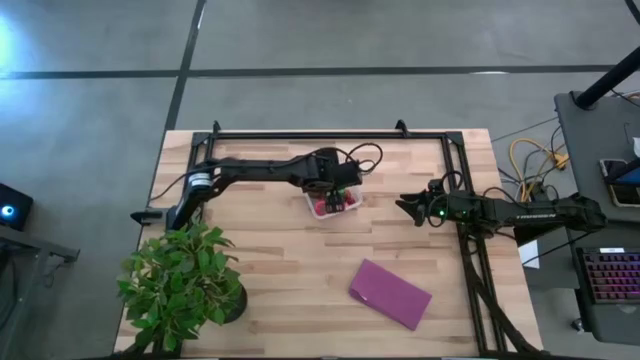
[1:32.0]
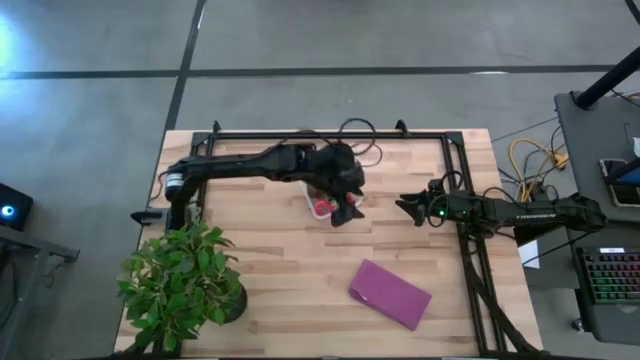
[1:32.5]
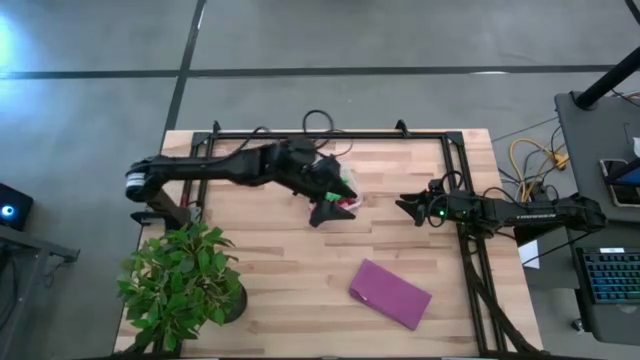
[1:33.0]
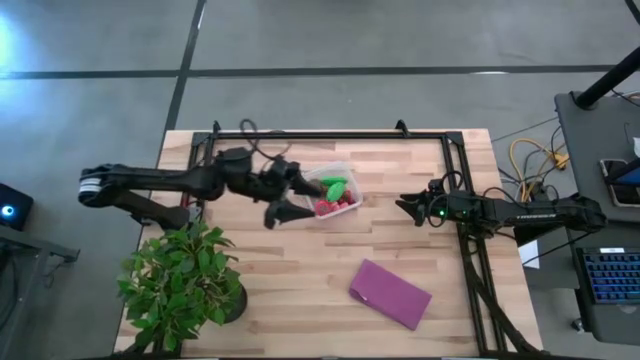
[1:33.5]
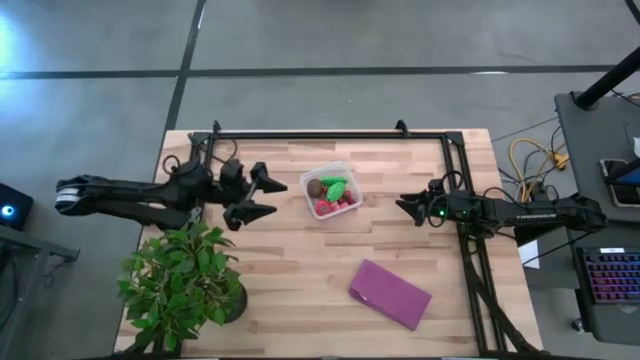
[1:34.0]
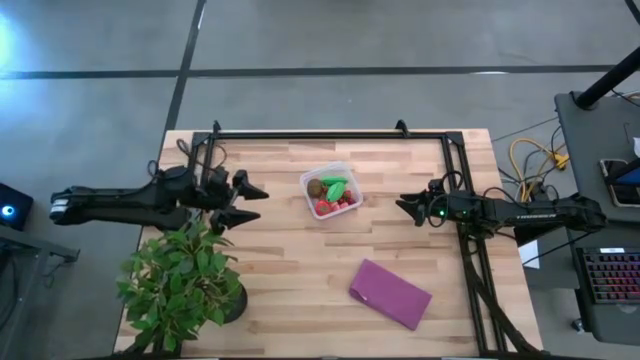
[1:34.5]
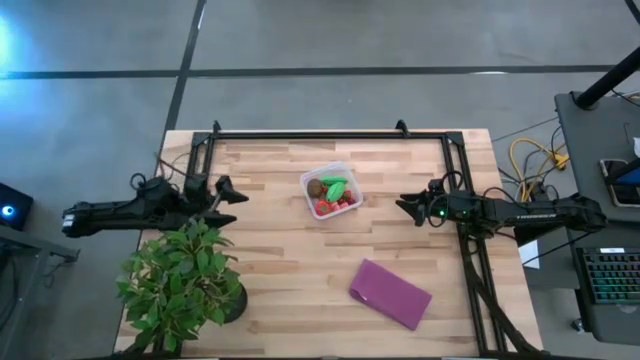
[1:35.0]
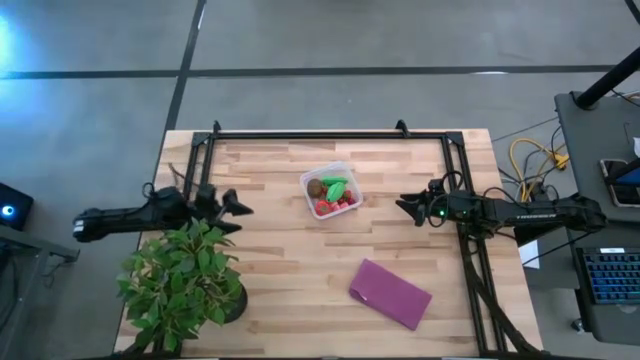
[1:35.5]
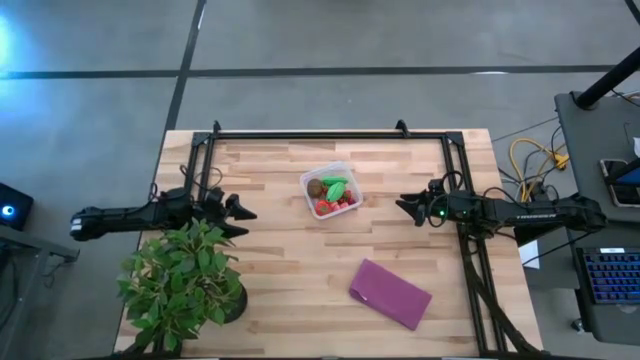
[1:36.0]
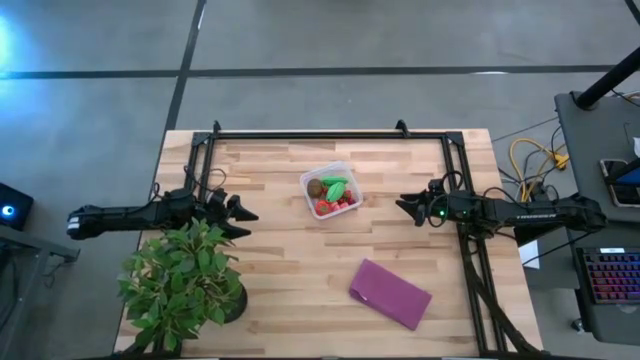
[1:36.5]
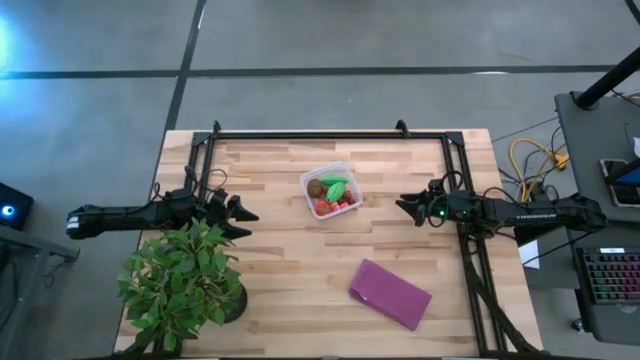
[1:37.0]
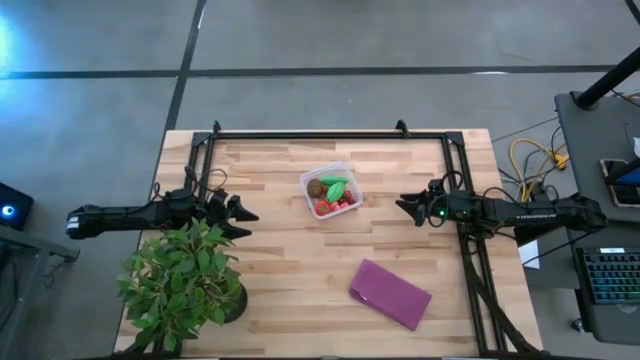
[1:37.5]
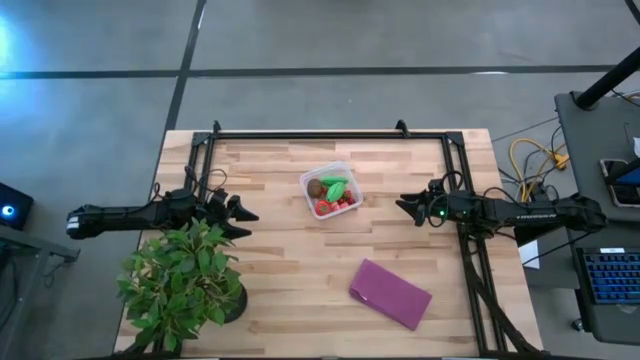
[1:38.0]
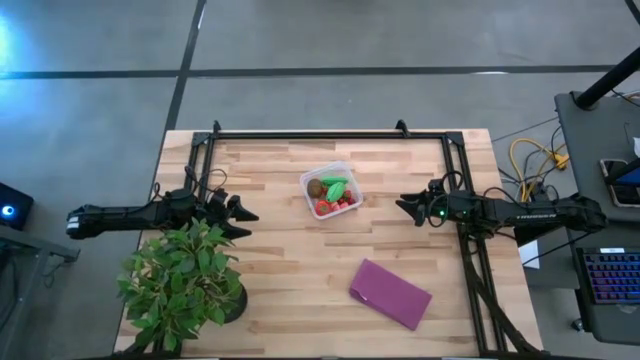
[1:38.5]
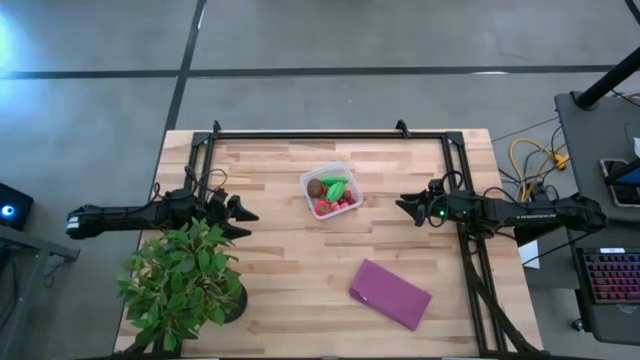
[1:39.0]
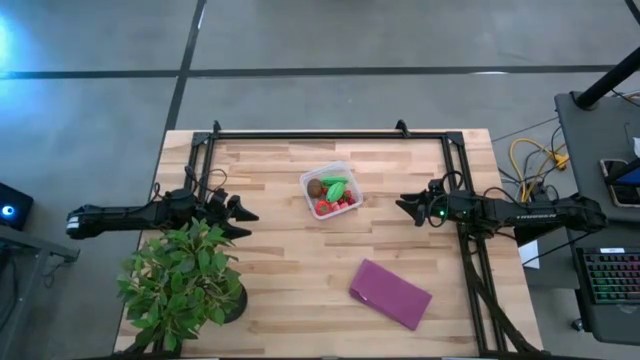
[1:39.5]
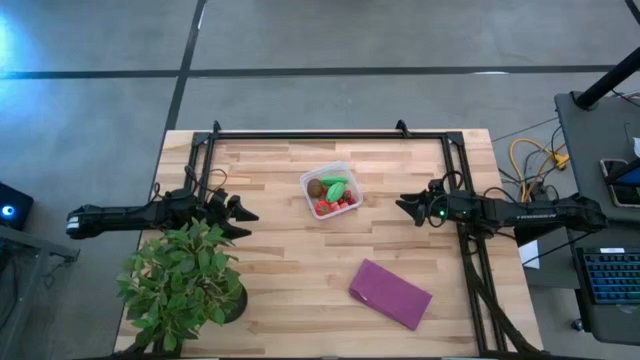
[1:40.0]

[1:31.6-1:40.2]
Task: Pick and placing Produce into tupperware
Return to Home Position

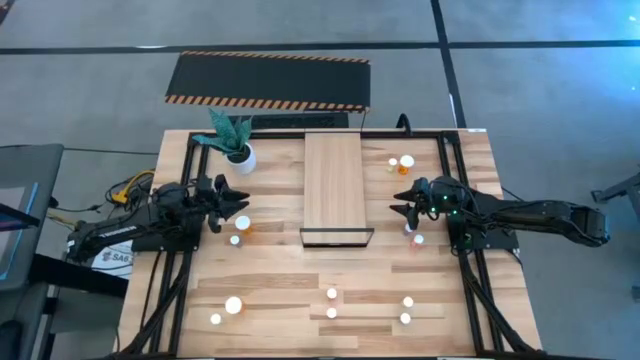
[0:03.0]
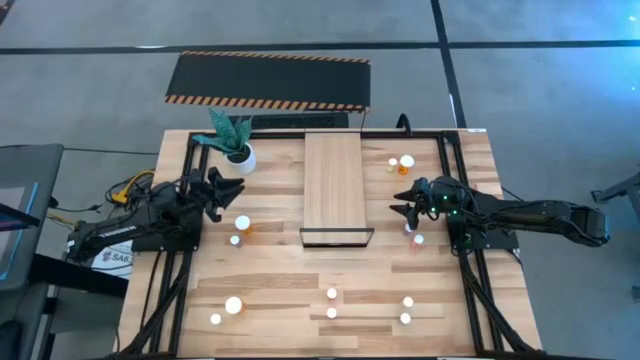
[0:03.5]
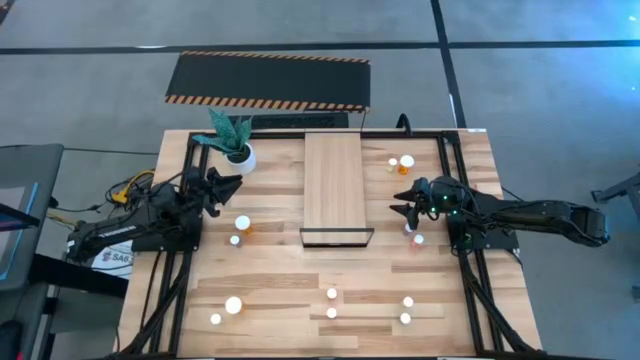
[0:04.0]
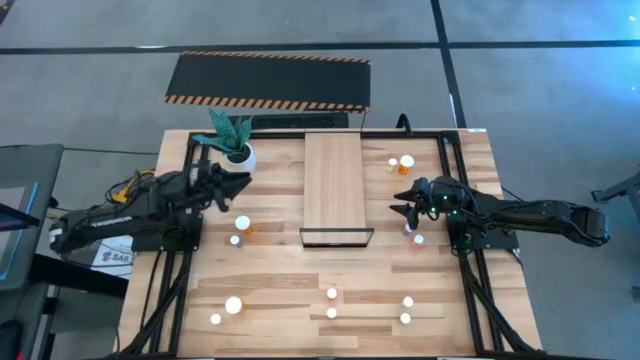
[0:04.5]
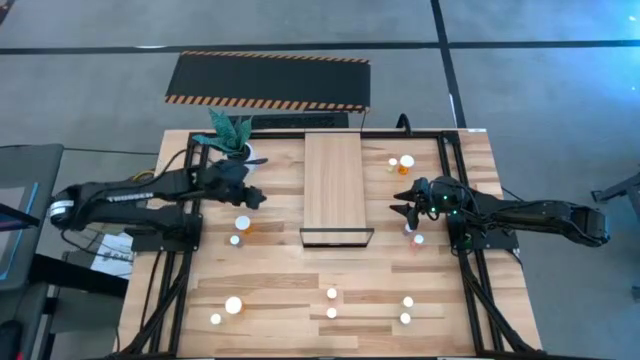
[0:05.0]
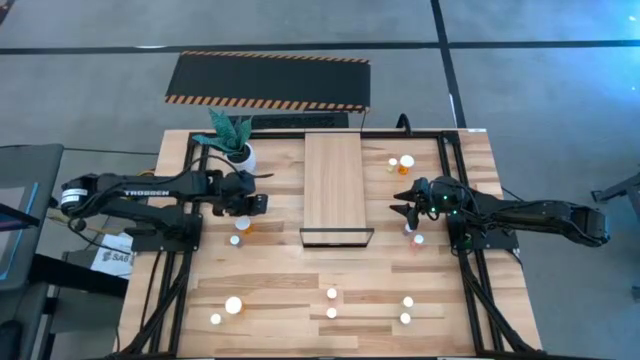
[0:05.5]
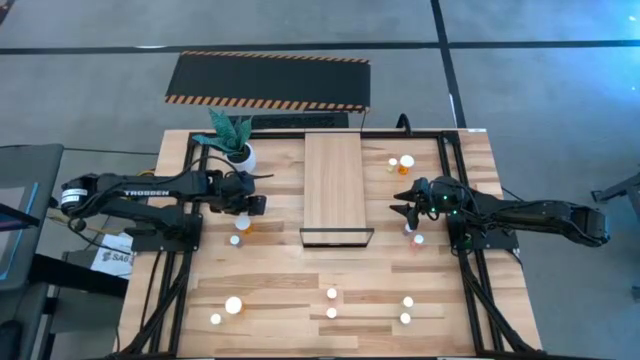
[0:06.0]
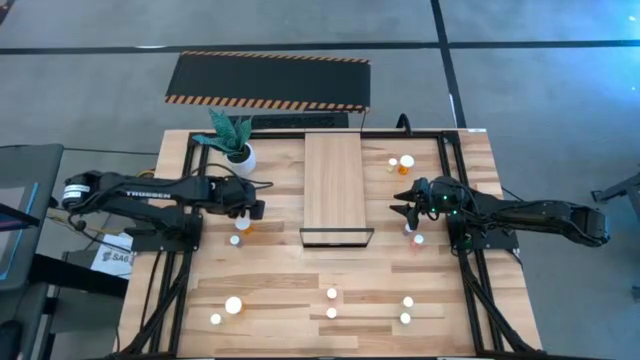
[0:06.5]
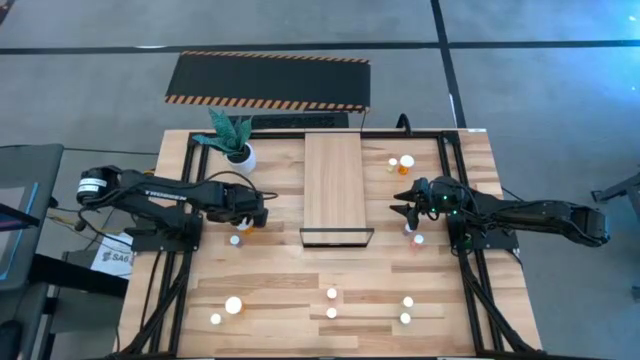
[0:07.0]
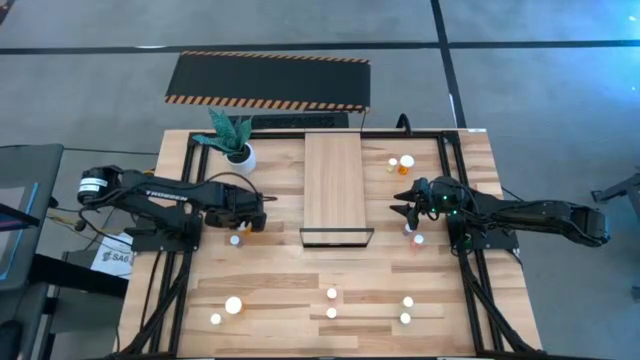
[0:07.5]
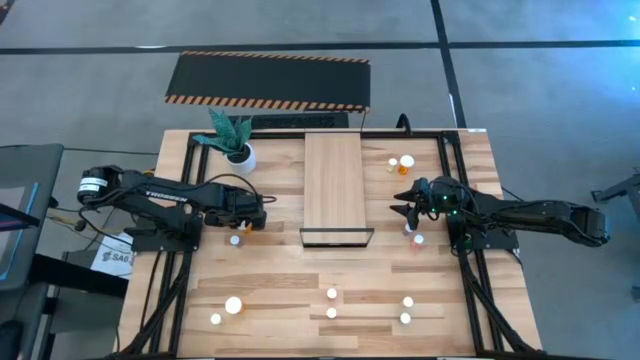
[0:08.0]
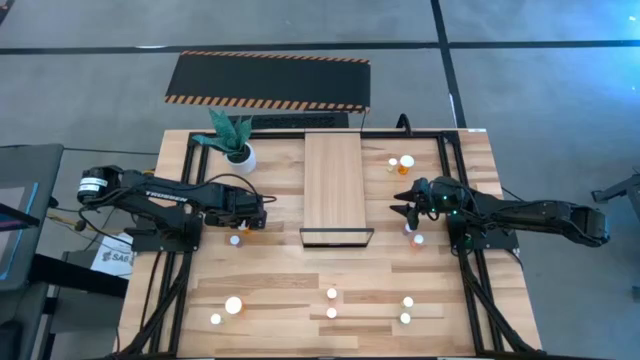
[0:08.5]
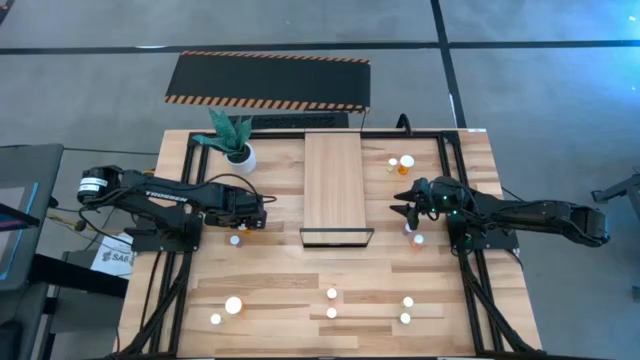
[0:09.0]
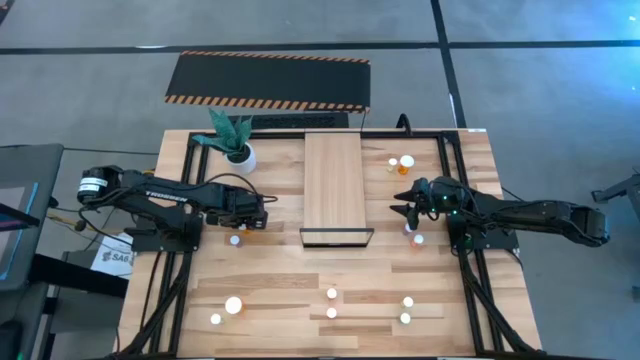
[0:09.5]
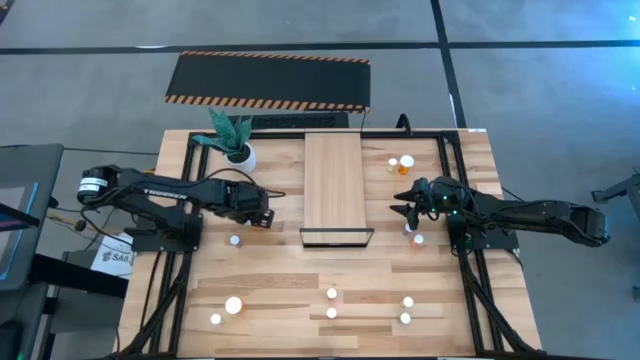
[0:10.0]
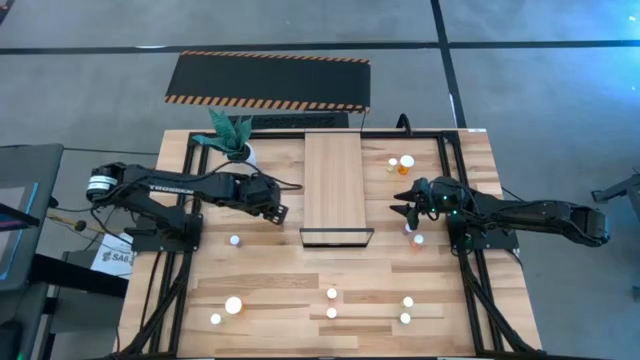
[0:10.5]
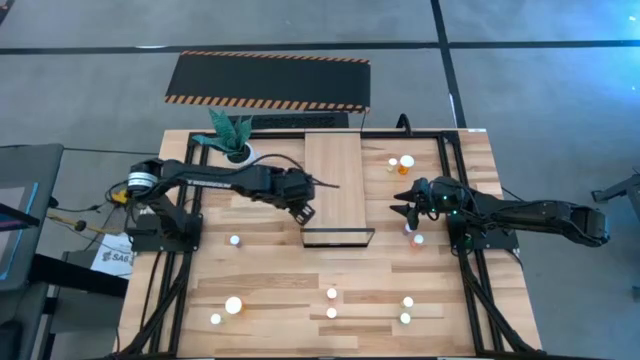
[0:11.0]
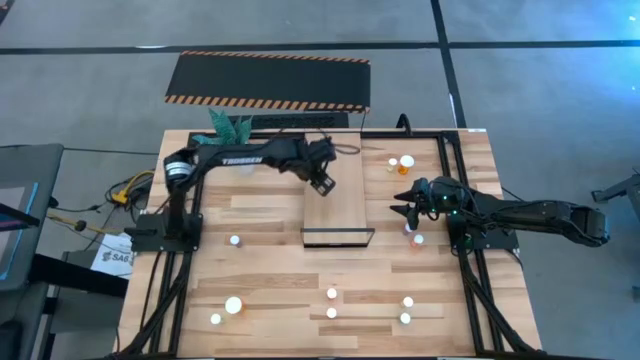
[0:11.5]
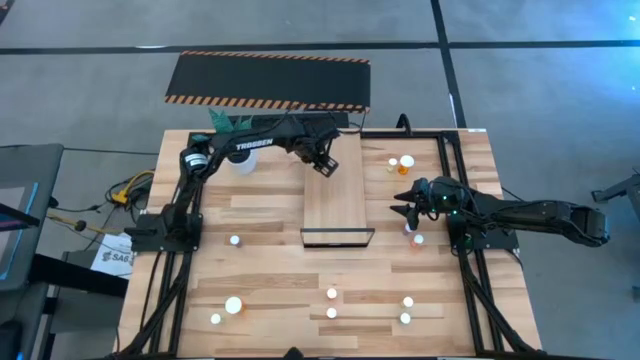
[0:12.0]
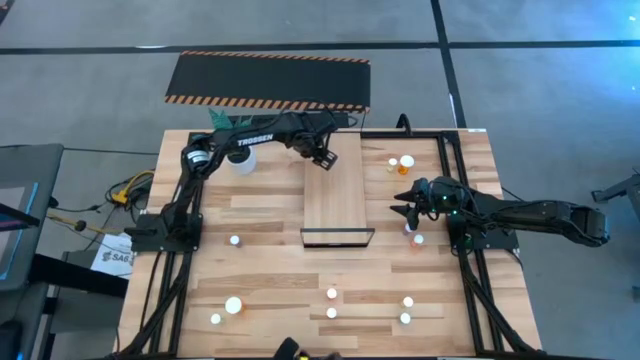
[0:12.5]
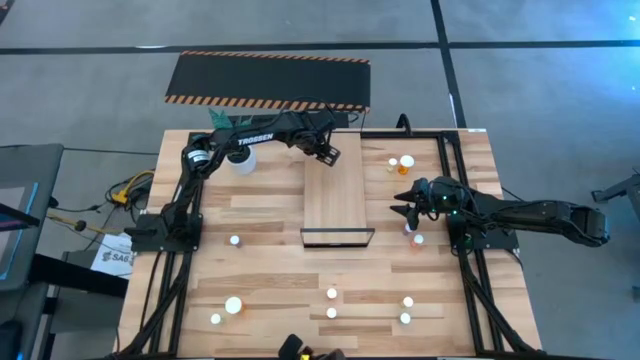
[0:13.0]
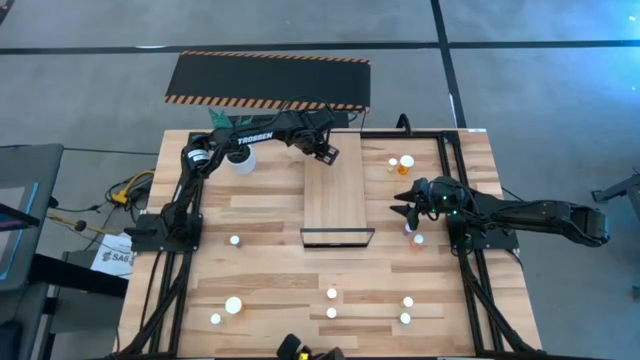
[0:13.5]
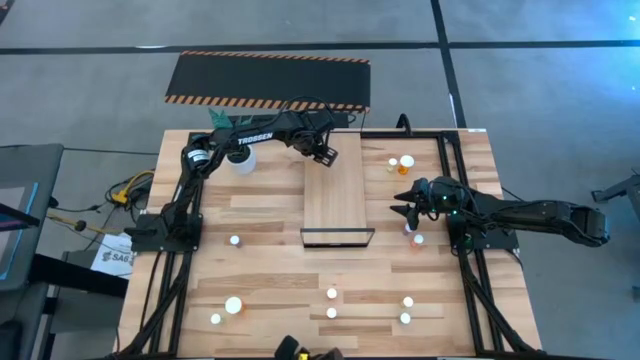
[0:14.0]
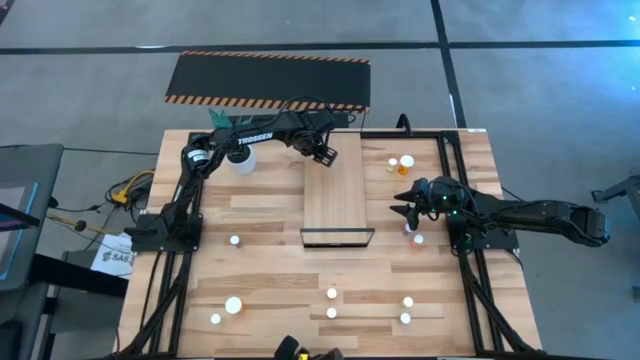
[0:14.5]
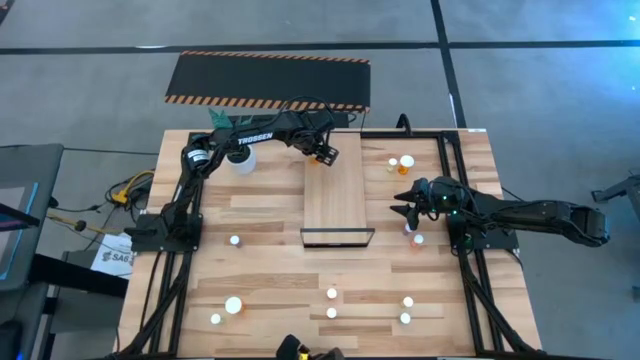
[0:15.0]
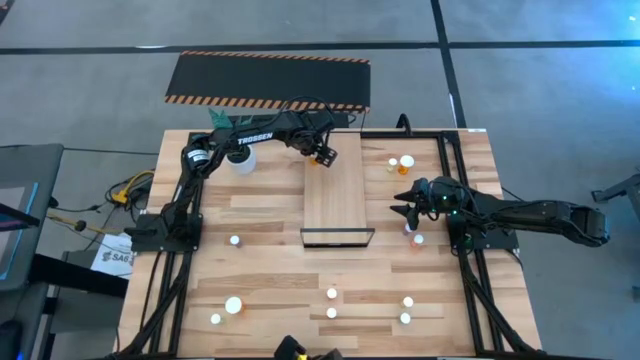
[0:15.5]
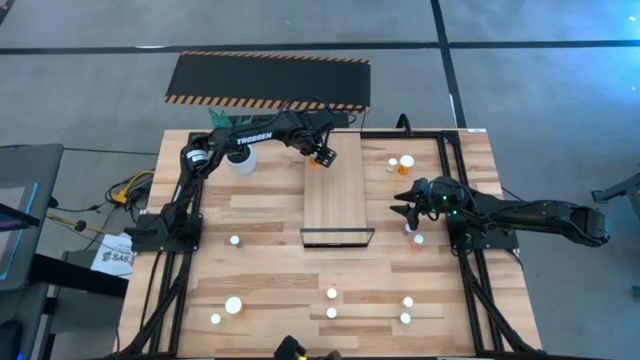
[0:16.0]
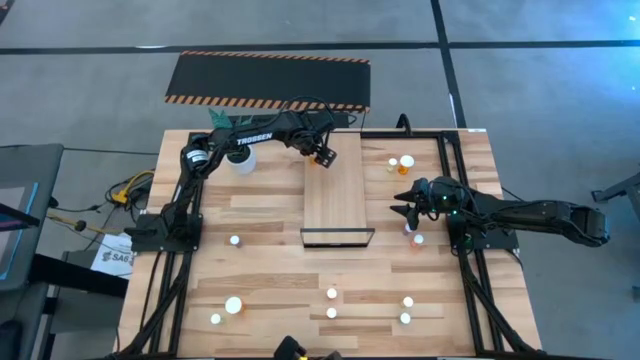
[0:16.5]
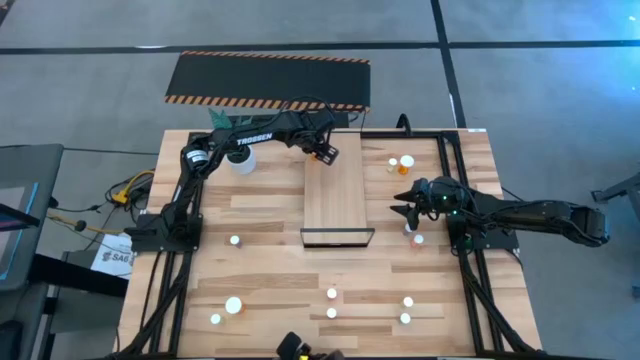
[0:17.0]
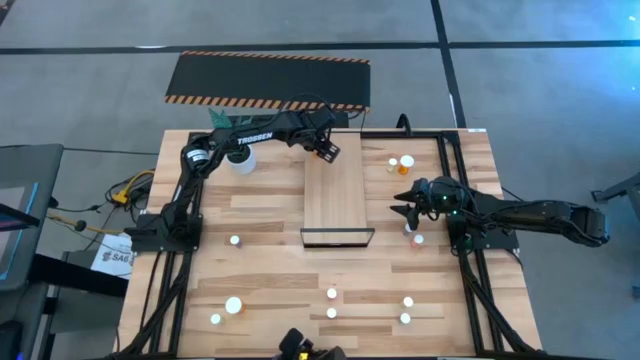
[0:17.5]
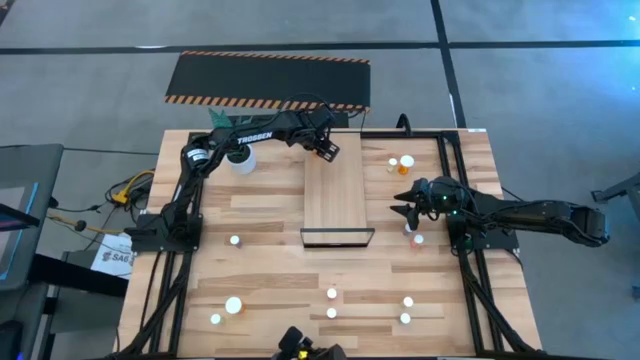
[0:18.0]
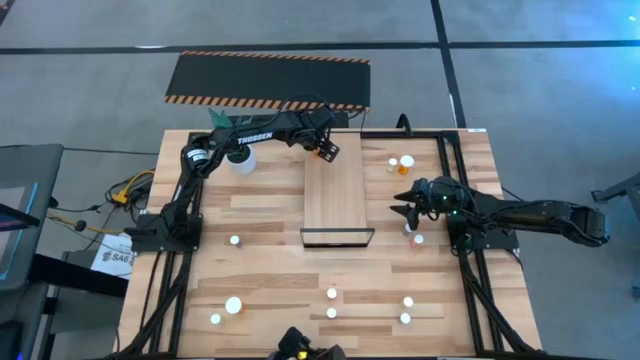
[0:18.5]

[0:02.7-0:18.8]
Task: Pick and place medicine bottles onto shelf by color
Put the middle orange pill bottle on the shelf
